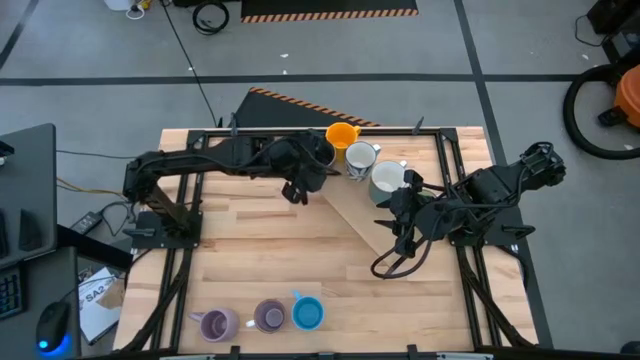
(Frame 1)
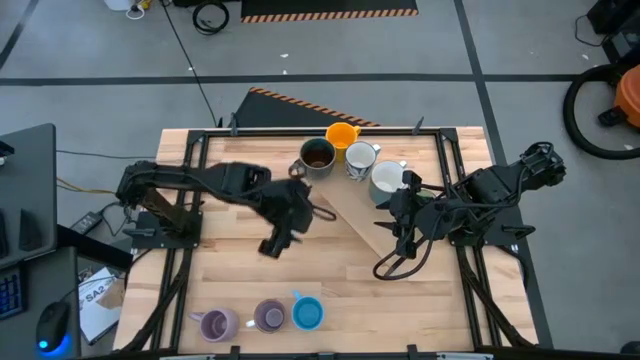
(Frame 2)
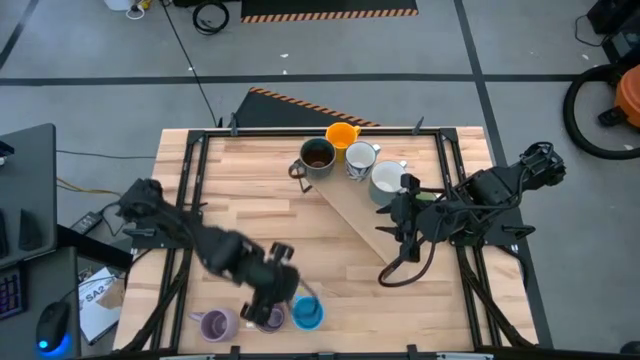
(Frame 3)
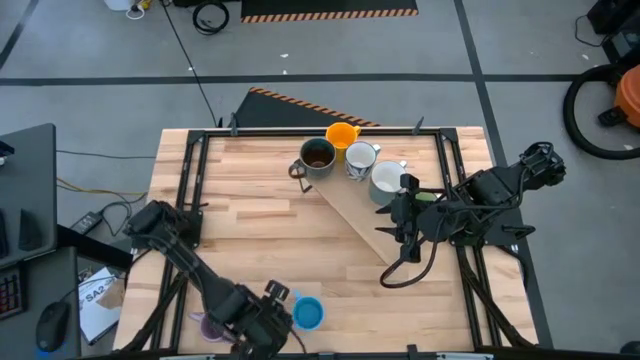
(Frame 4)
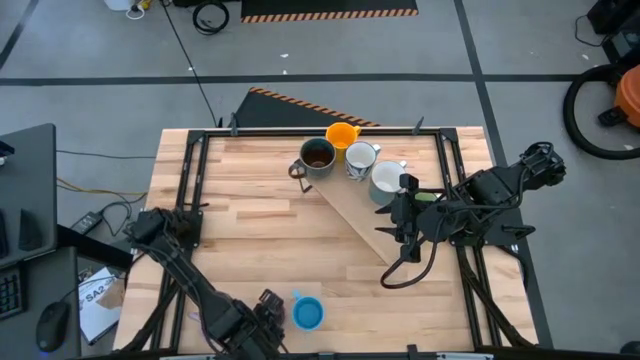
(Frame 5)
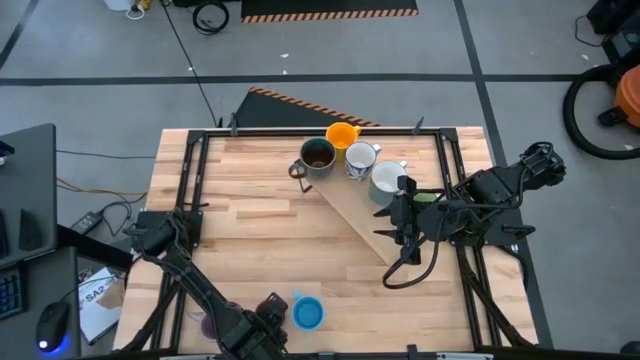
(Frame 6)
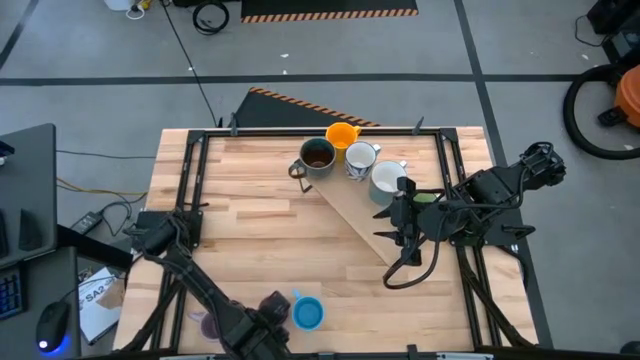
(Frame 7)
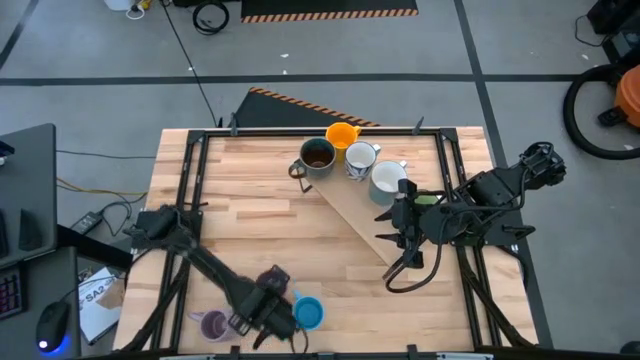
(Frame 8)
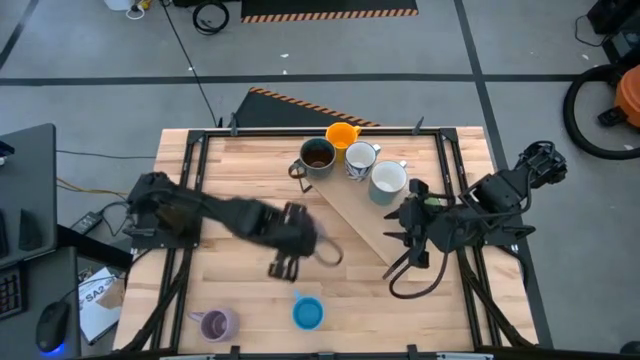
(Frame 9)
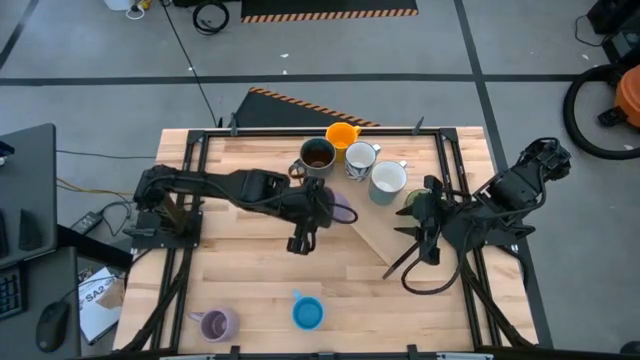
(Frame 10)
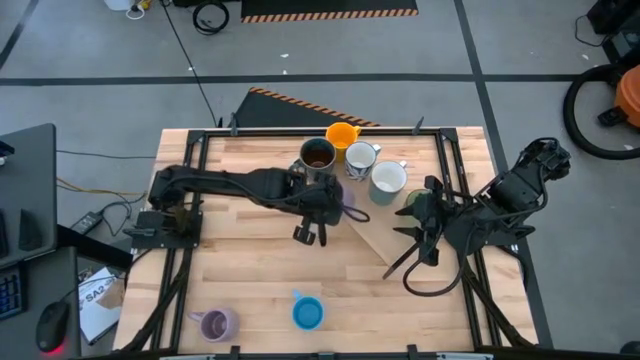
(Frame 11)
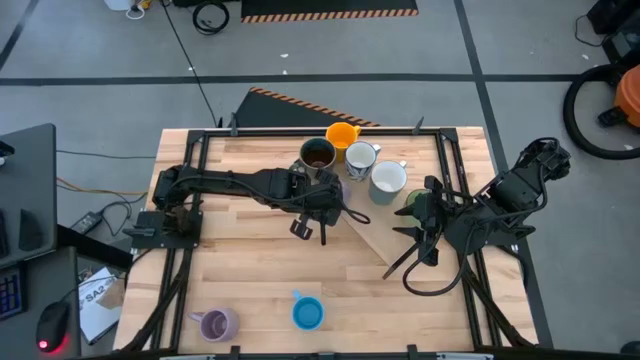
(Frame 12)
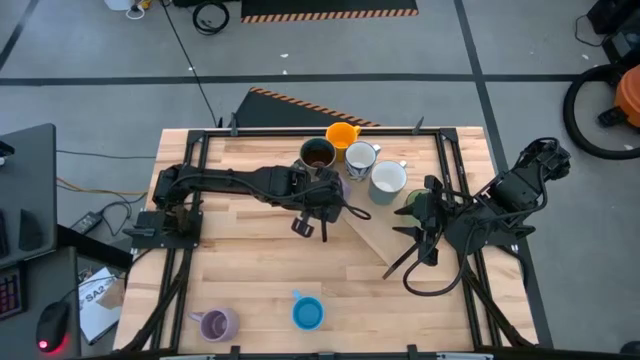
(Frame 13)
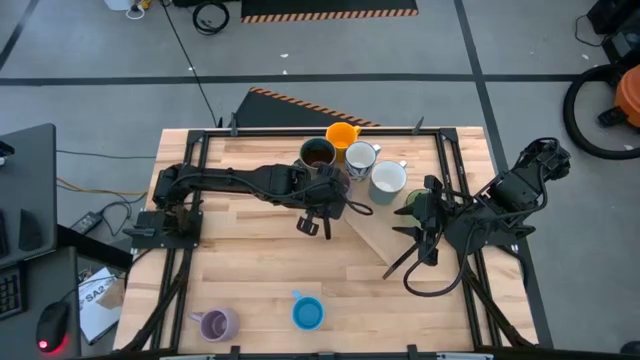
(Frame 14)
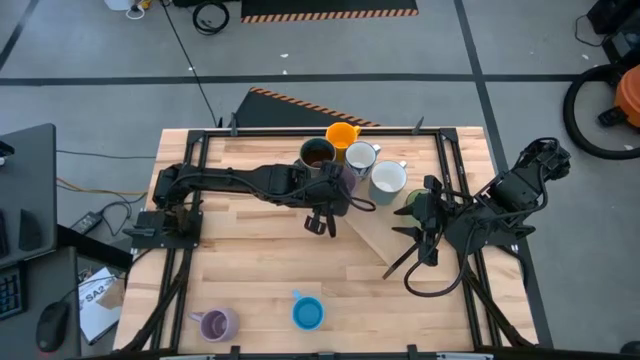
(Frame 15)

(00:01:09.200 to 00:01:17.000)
Task: Place coffee mugs
Put the right purple mug on the shelf

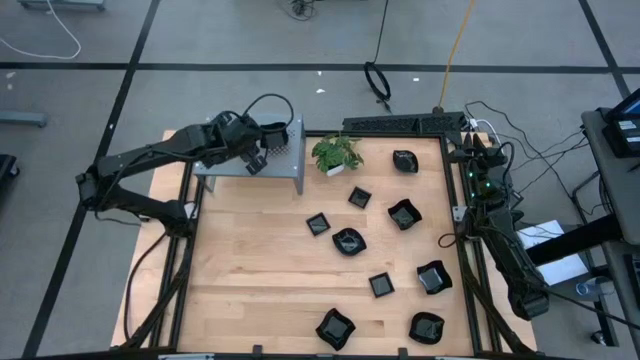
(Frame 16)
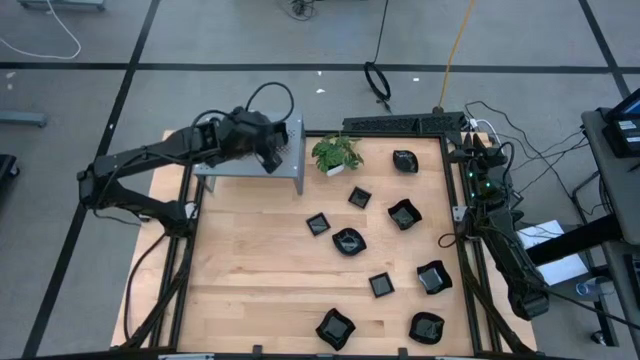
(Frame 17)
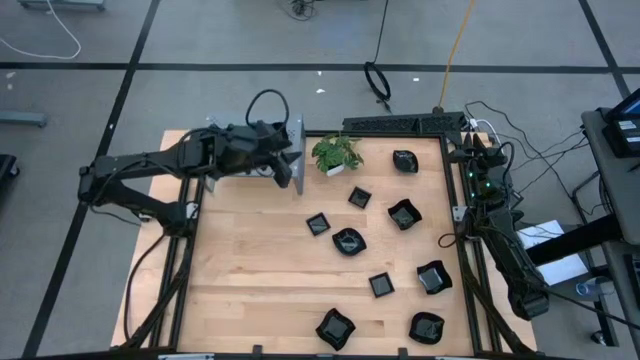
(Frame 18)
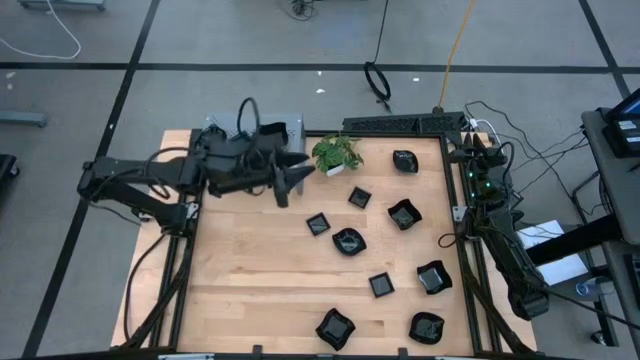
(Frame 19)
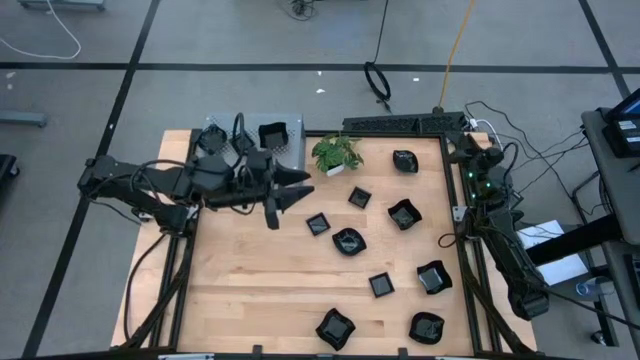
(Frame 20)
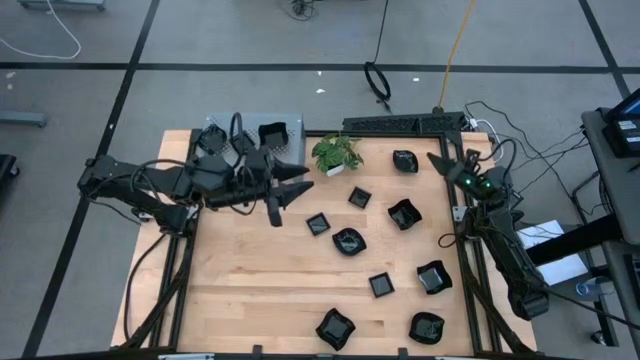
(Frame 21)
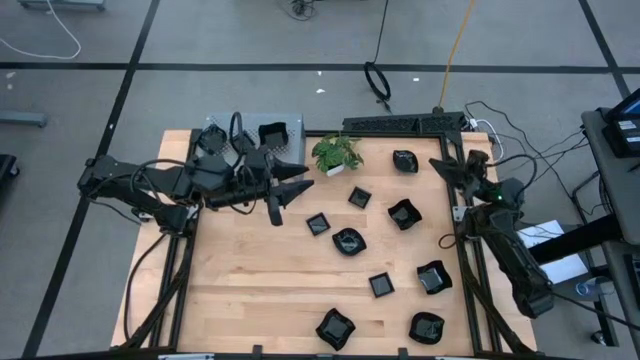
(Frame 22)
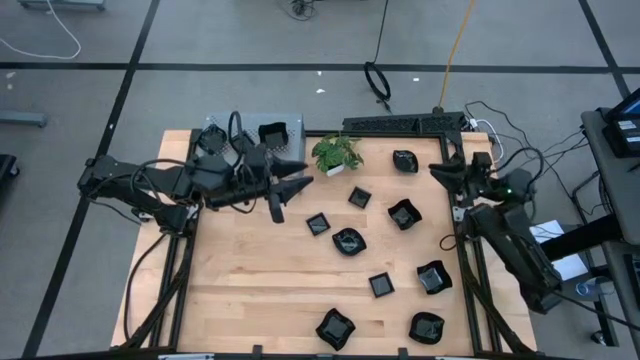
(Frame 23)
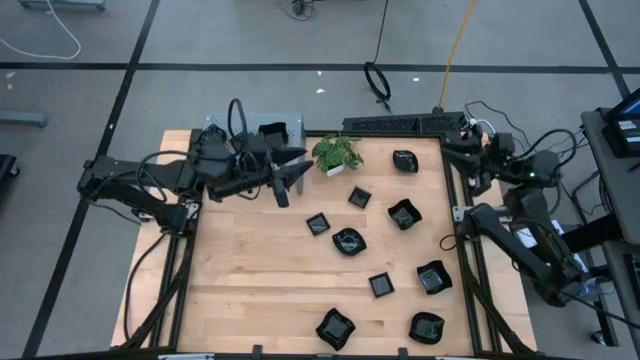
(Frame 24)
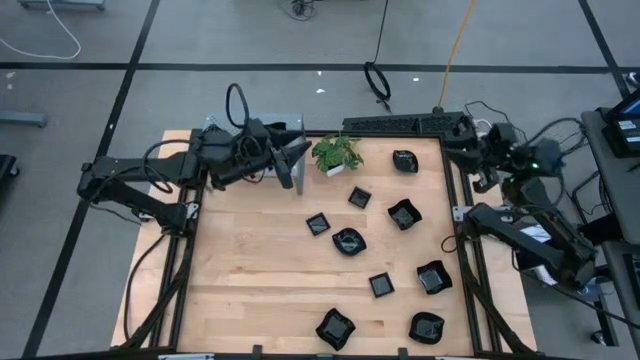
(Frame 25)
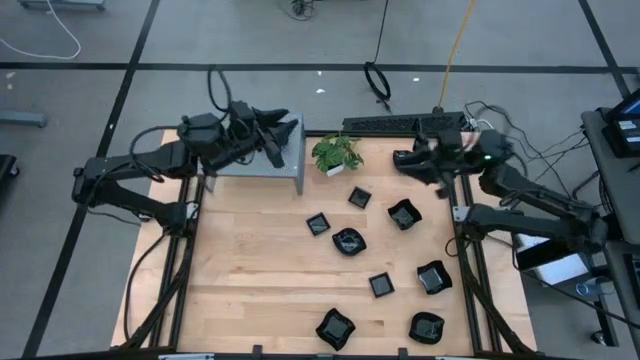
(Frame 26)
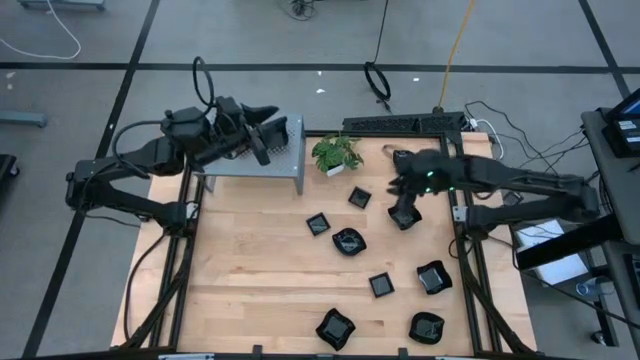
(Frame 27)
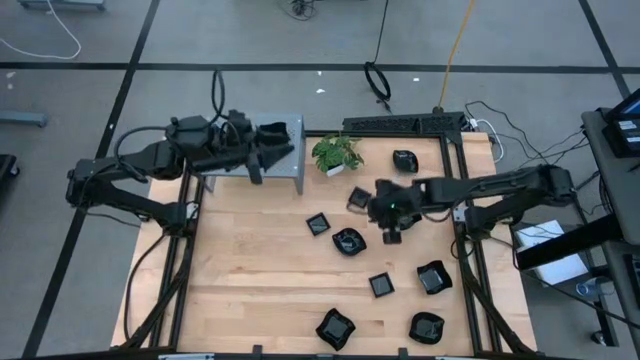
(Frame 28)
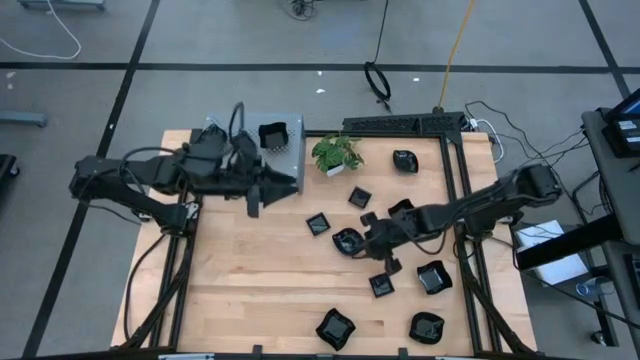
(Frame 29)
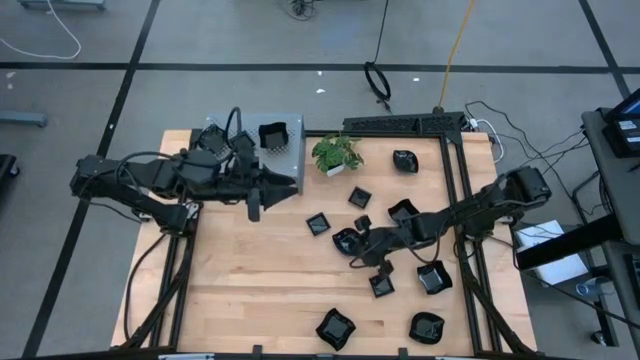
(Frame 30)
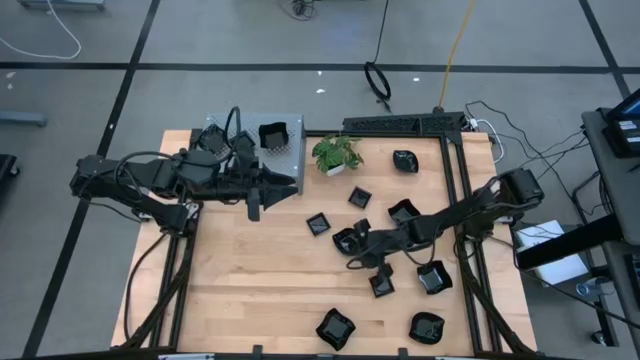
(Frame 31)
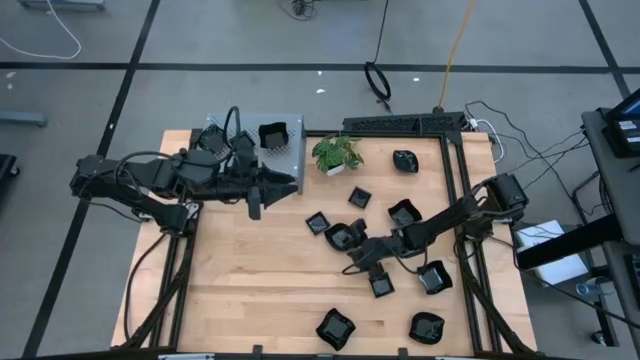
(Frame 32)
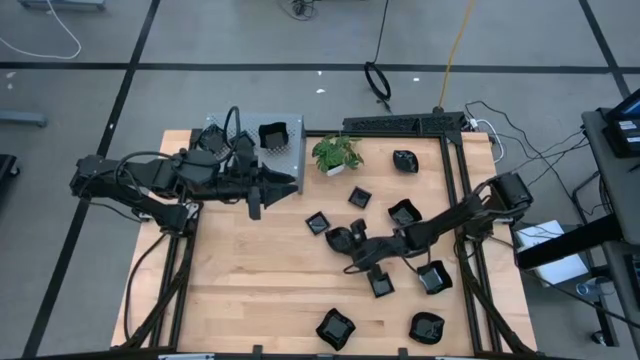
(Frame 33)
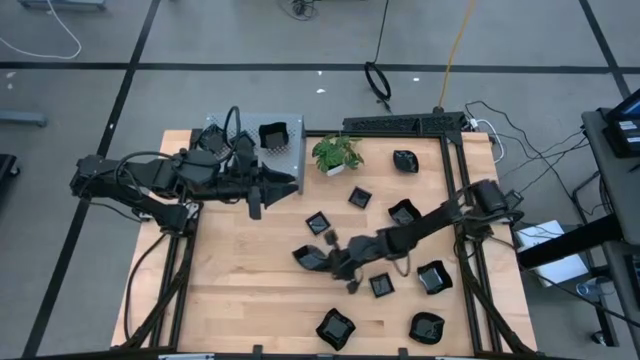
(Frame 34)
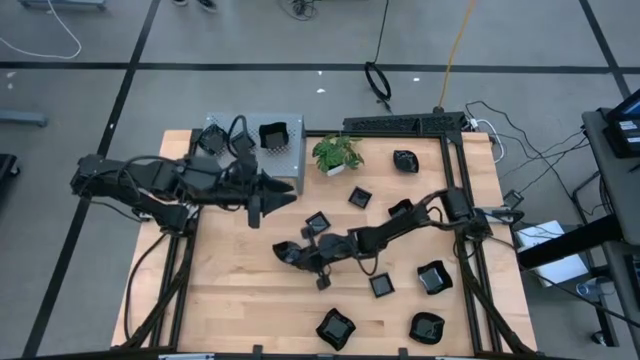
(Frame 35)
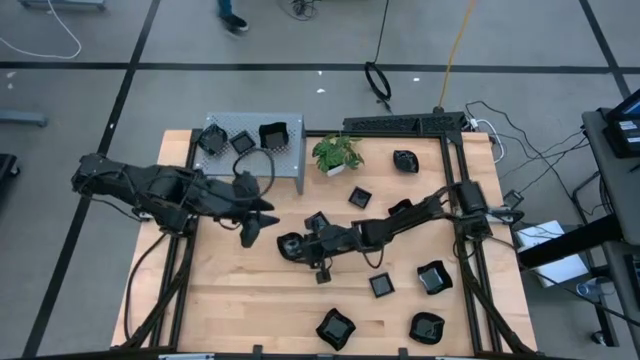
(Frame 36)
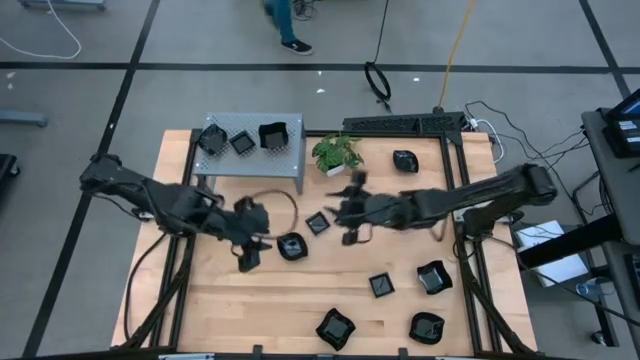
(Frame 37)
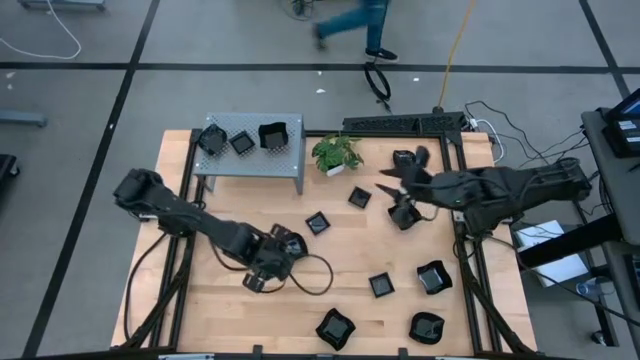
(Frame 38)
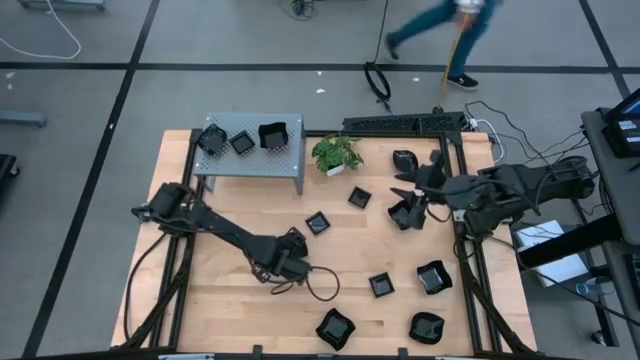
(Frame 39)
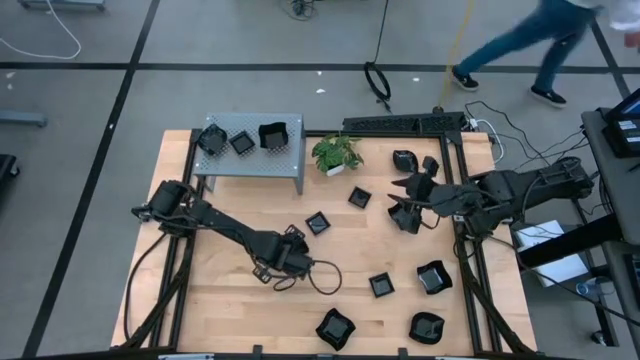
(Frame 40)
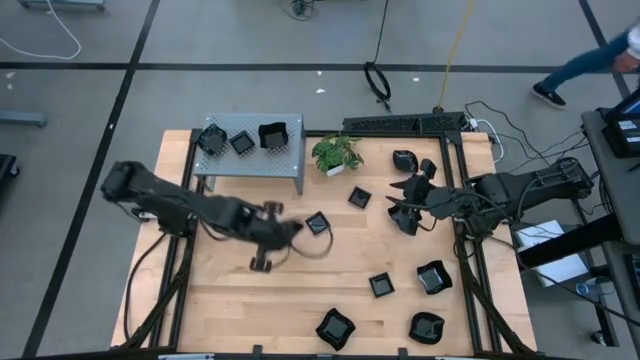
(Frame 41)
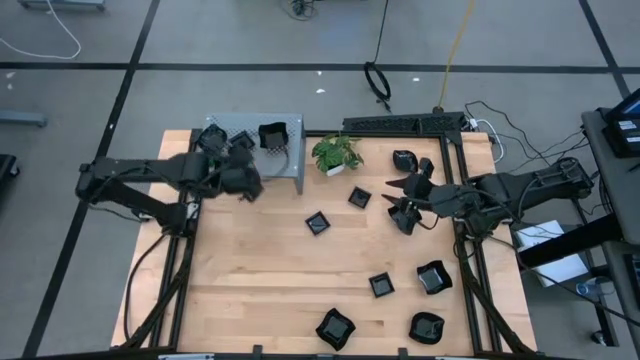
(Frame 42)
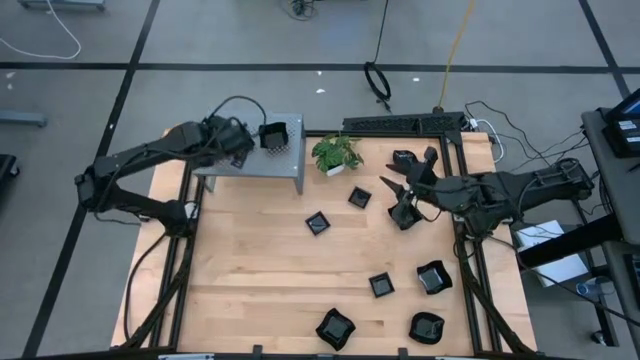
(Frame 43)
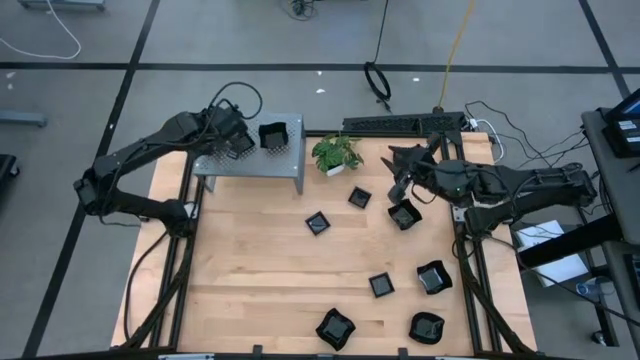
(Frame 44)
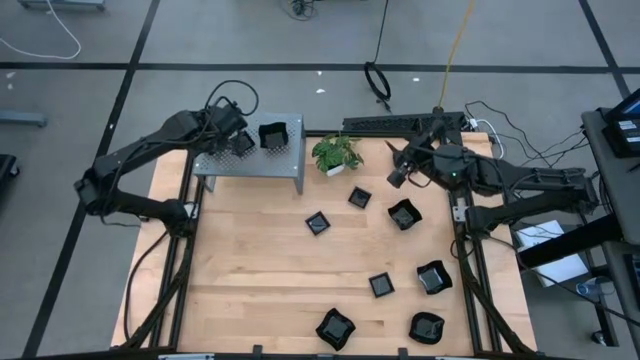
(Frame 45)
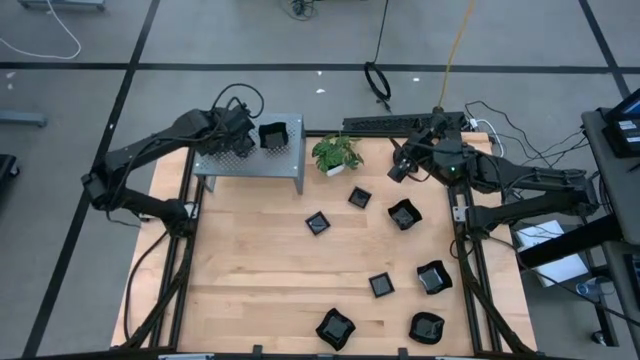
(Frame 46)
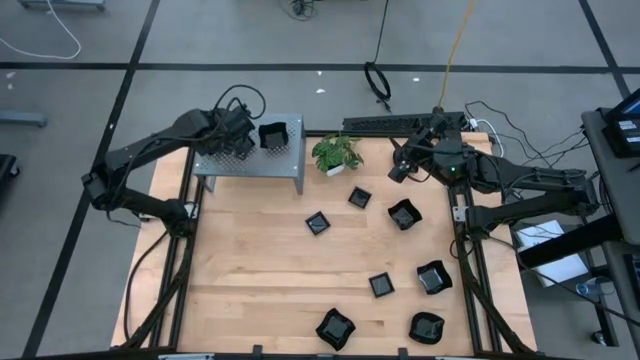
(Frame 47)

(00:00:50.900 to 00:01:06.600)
Task: Pick & Place Mini shaped plates
Stack the black leaf shaped plate on top of the other black leaf shaped plates on the shelf
